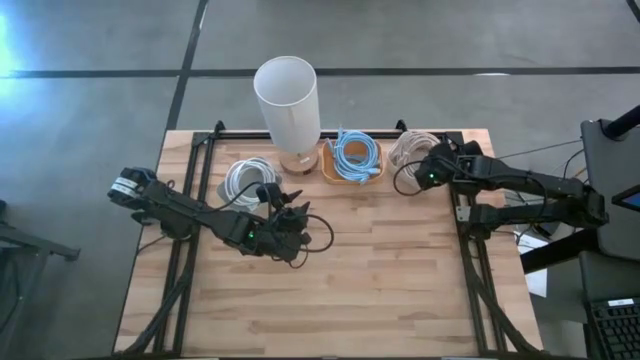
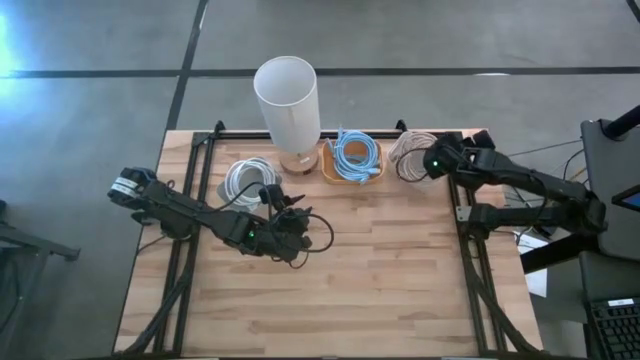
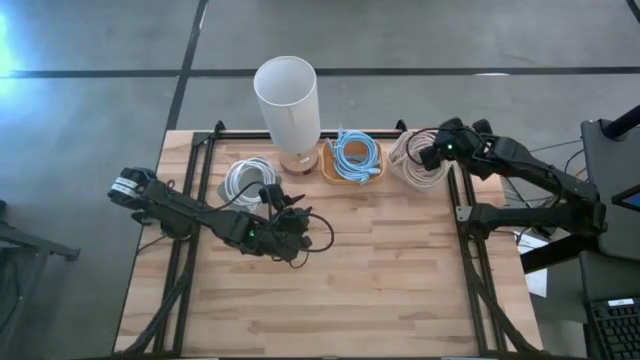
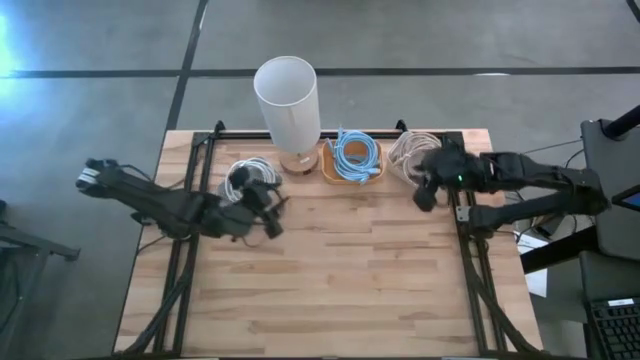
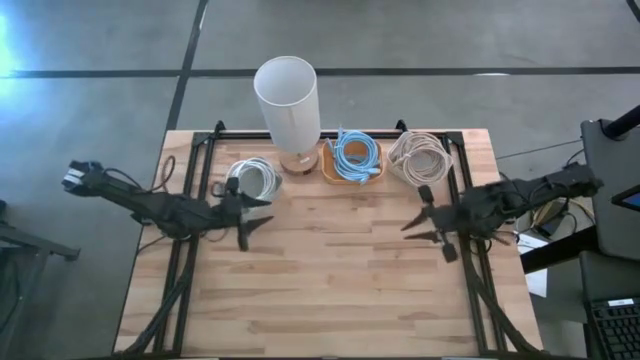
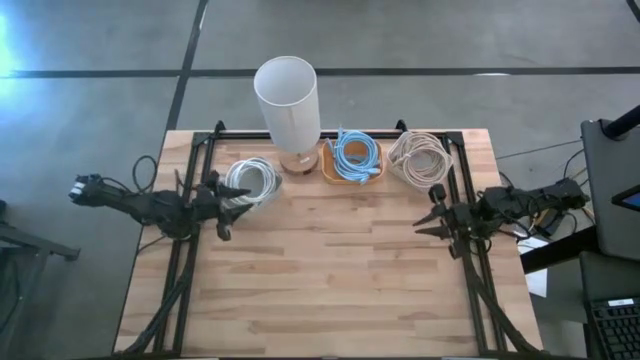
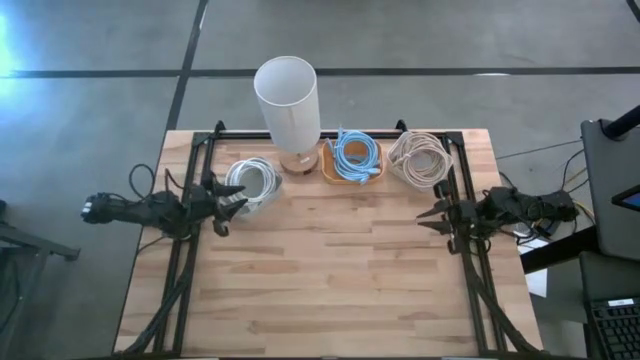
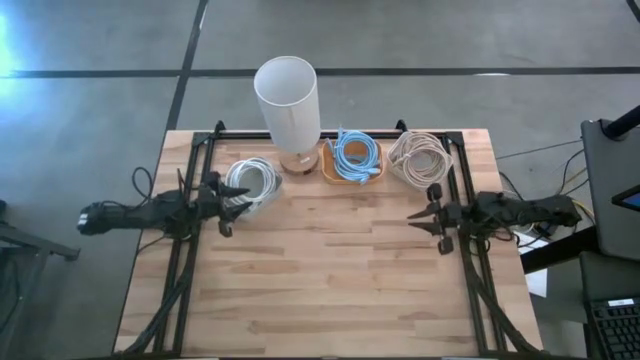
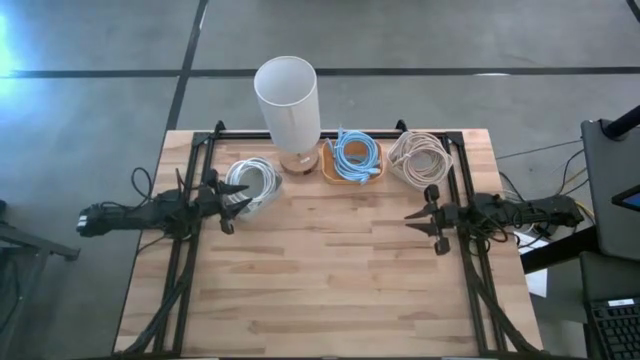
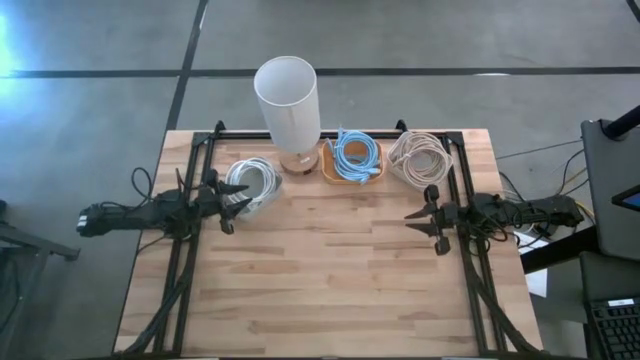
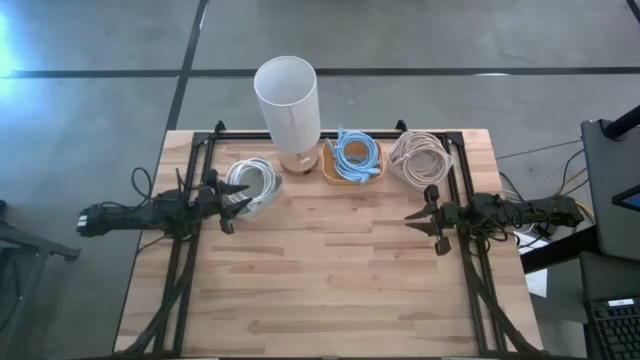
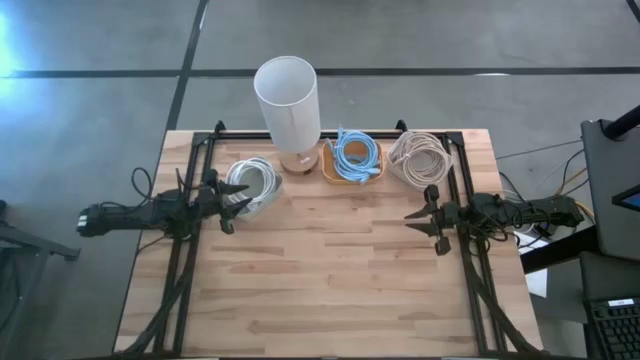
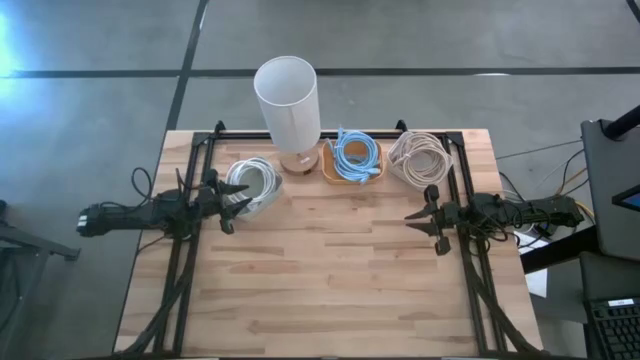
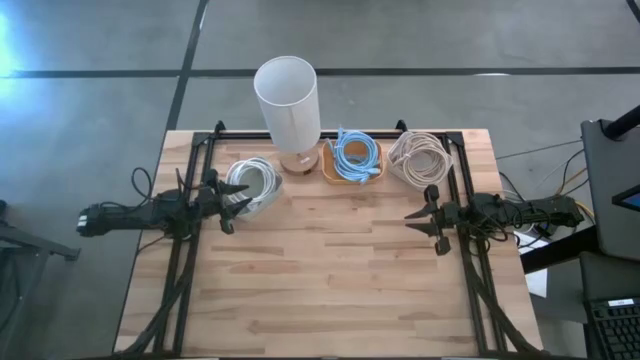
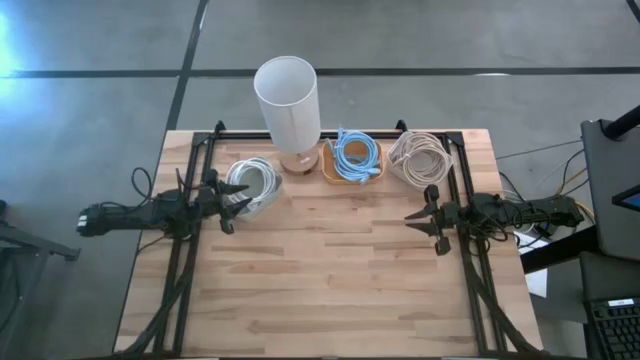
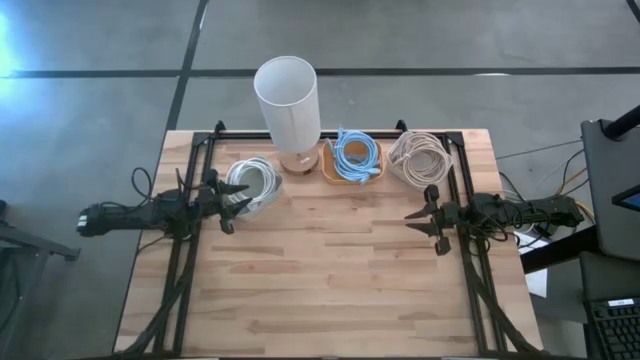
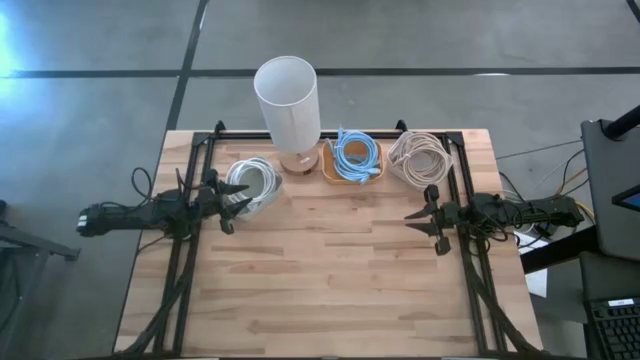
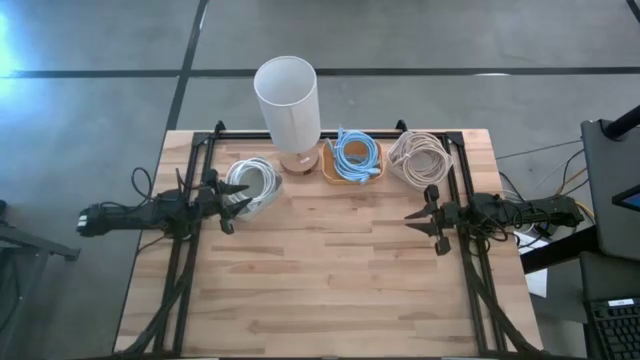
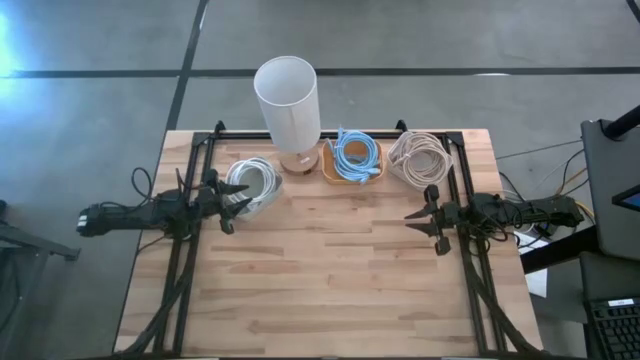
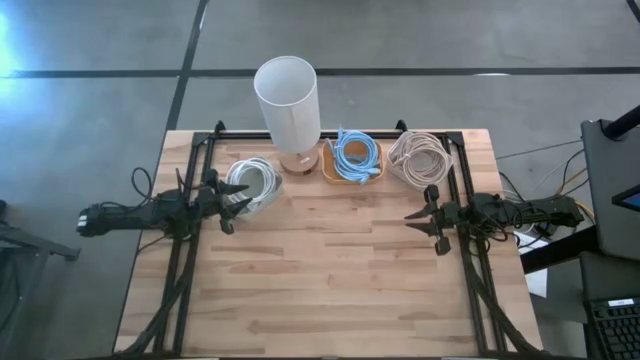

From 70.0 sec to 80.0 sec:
Task: Sort HDMI cables
Return to Home Position

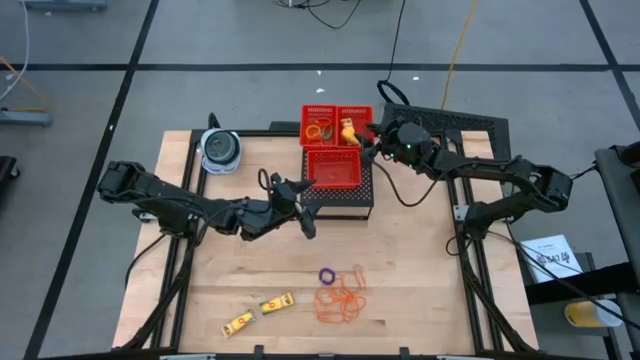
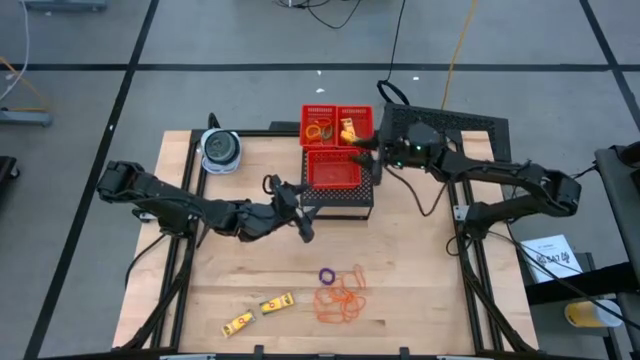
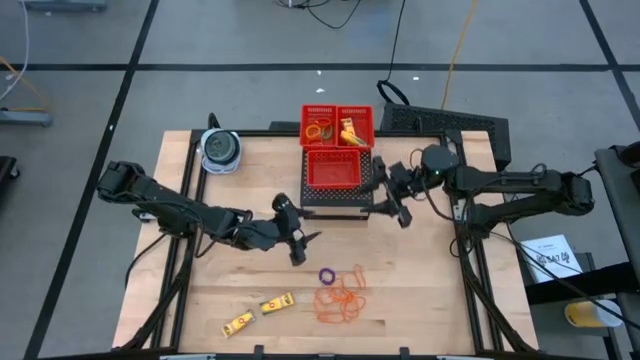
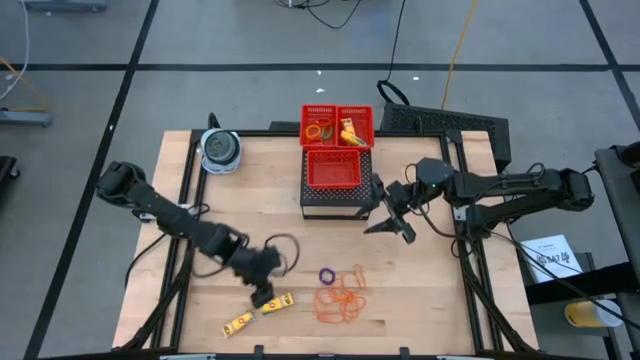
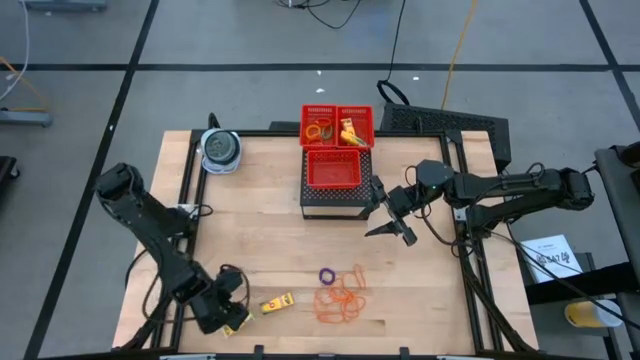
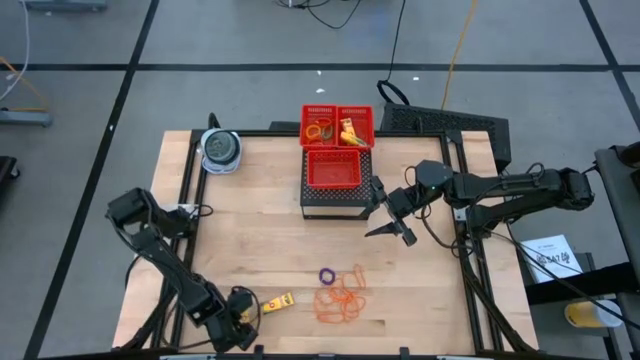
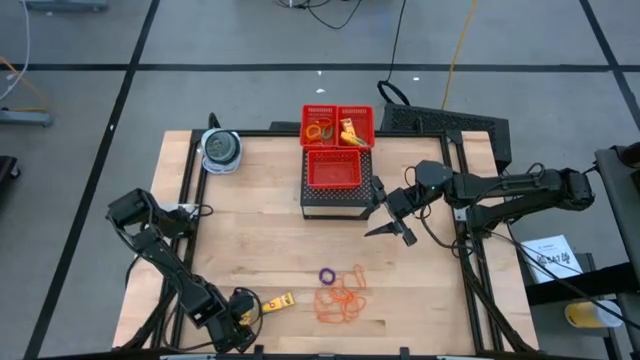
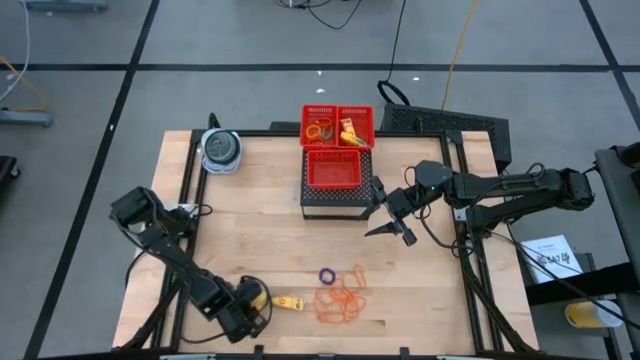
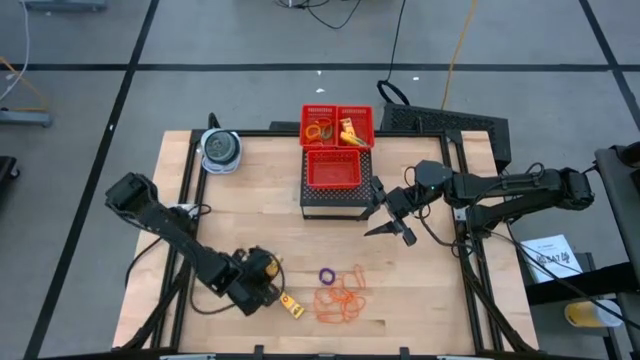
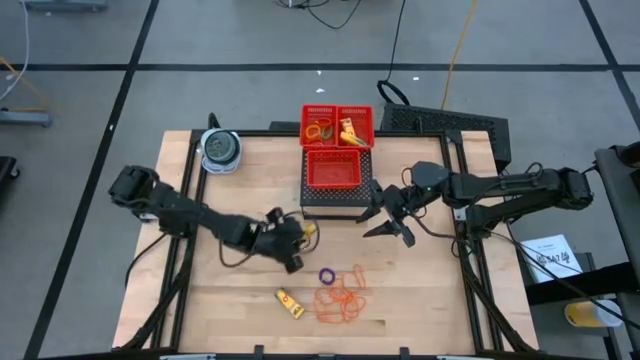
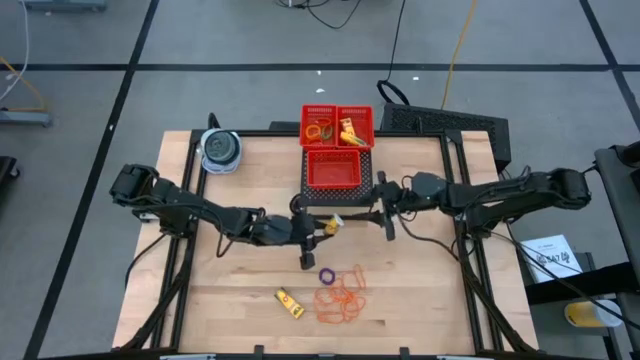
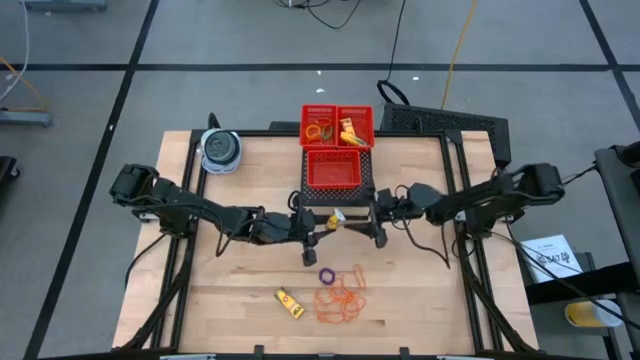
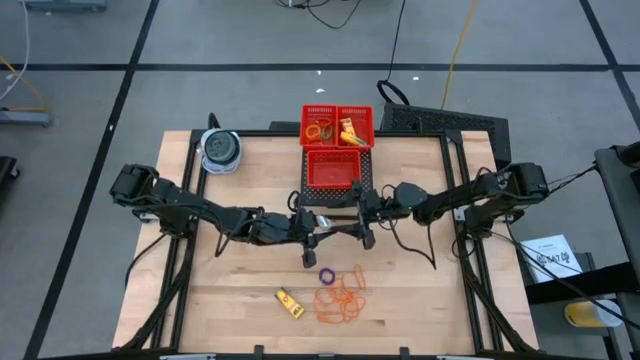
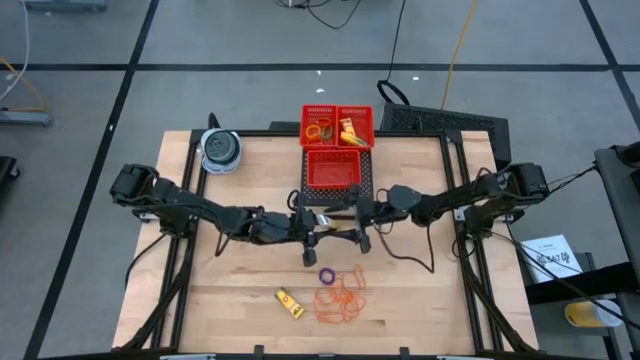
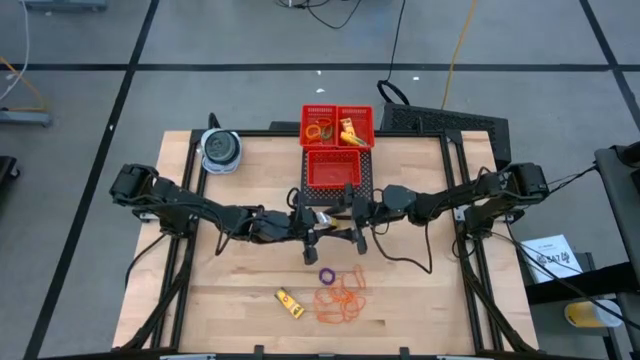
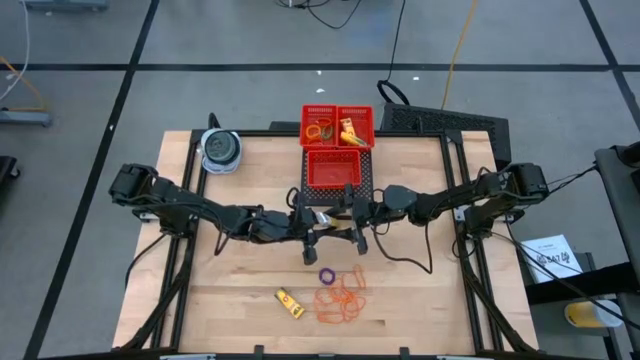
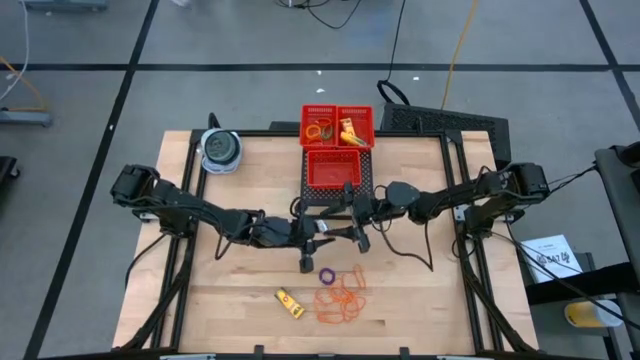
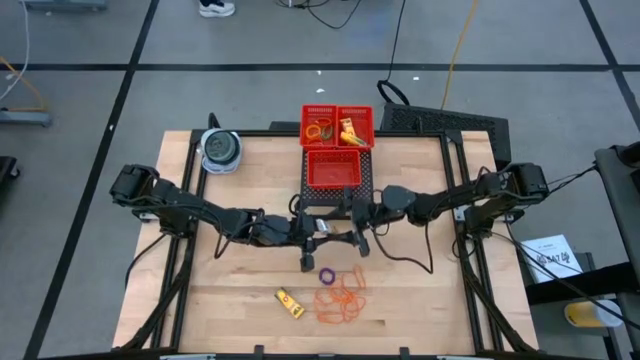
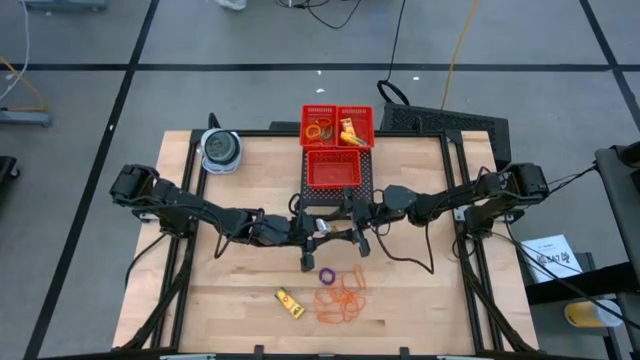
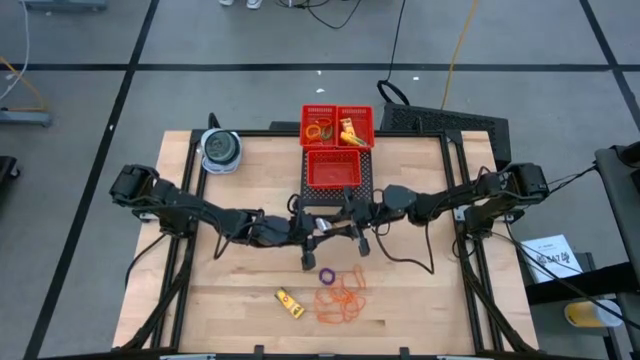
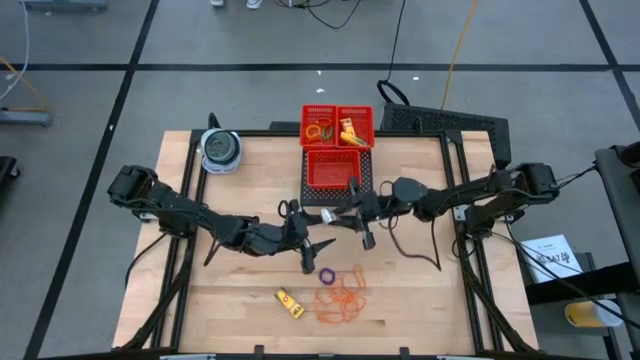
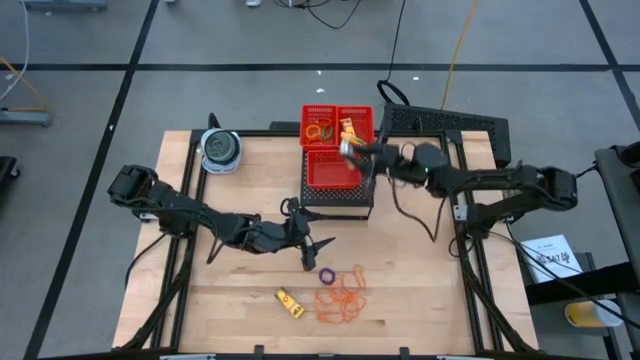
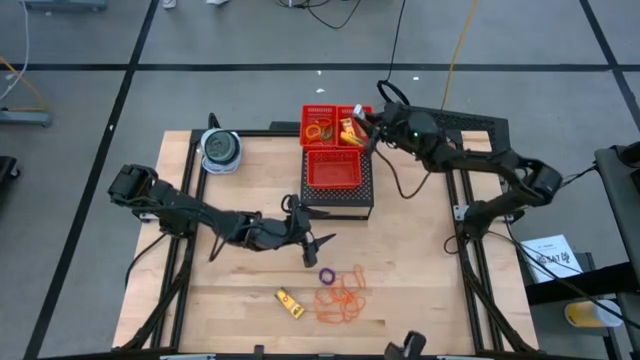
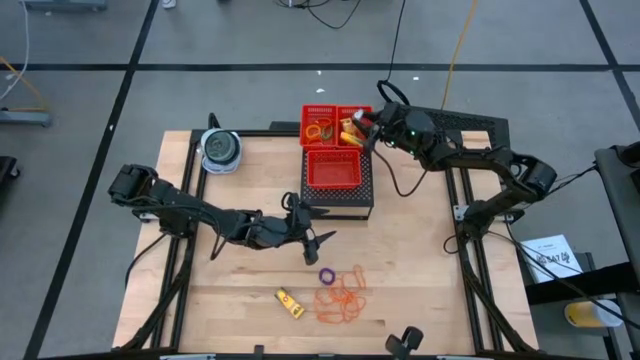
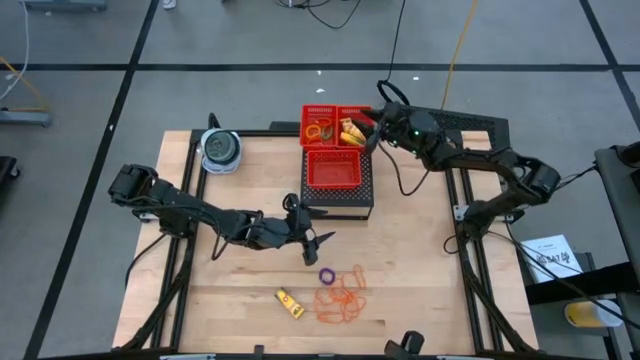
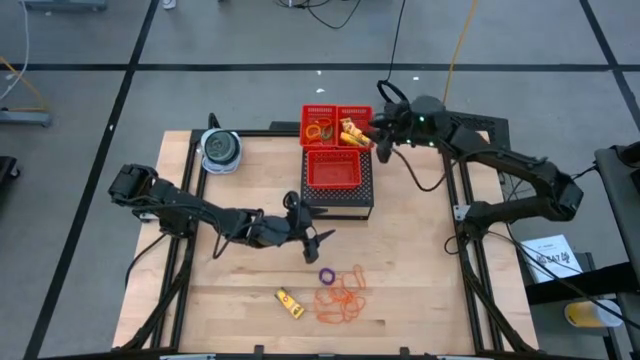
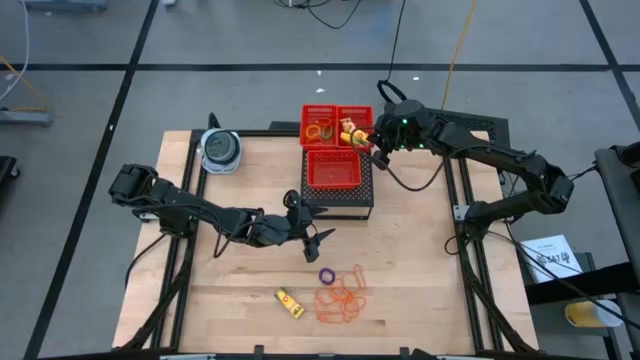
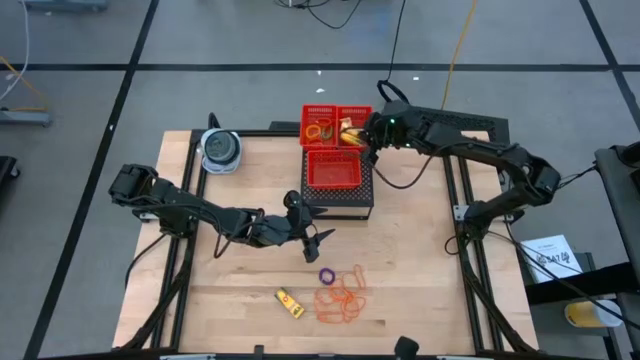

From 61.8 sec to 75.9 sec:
Task: Pick & Place Office Desk Supplies
Put the yellow pack of crayon in the top right red bin on the shelf
